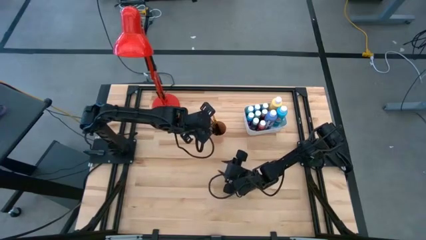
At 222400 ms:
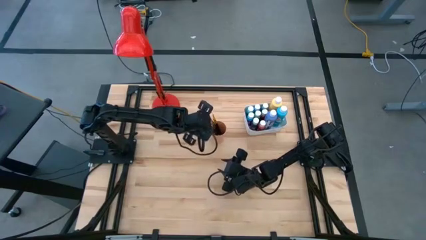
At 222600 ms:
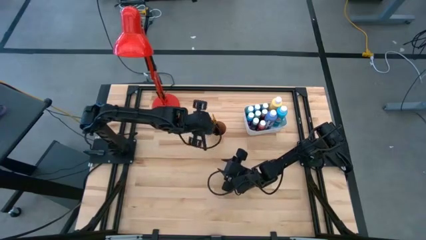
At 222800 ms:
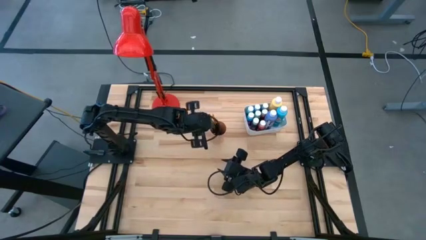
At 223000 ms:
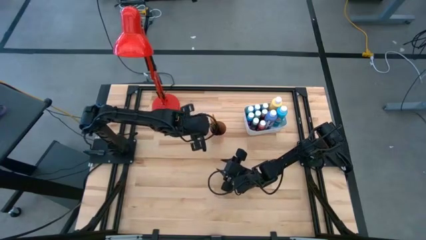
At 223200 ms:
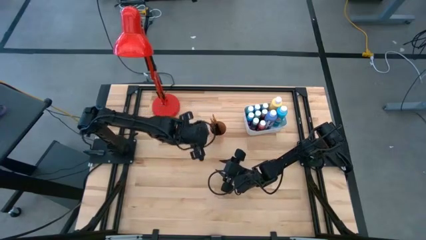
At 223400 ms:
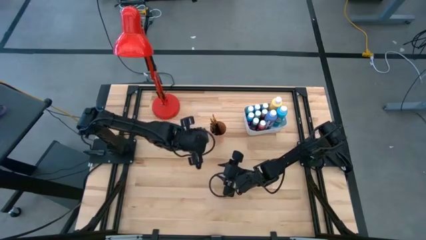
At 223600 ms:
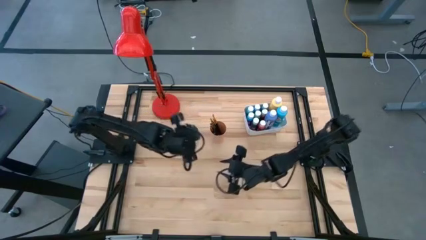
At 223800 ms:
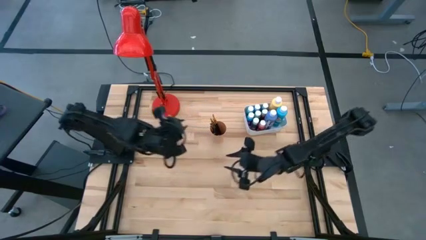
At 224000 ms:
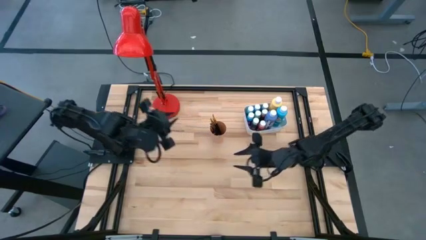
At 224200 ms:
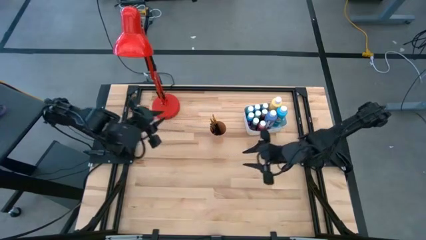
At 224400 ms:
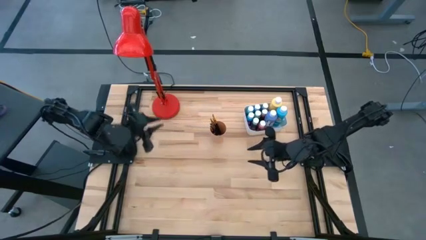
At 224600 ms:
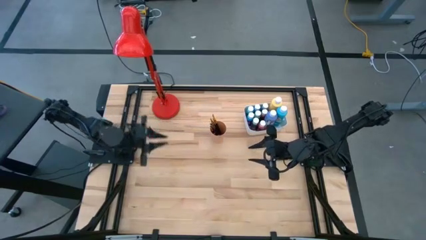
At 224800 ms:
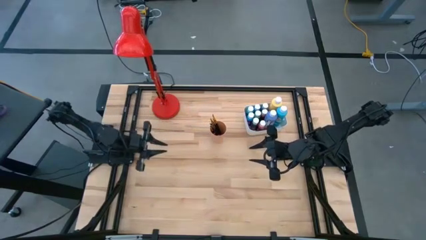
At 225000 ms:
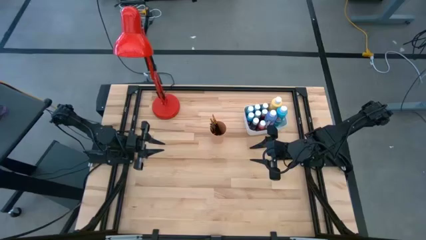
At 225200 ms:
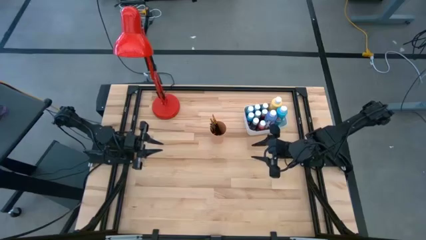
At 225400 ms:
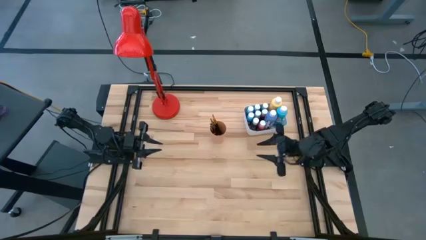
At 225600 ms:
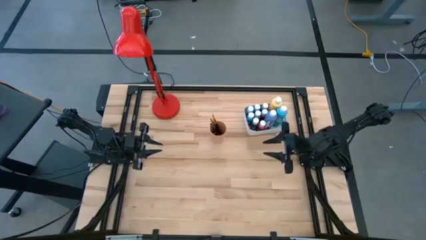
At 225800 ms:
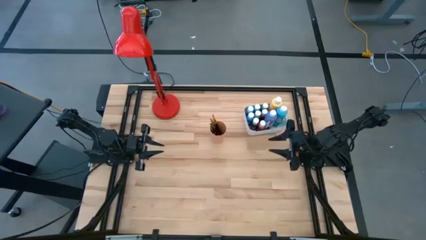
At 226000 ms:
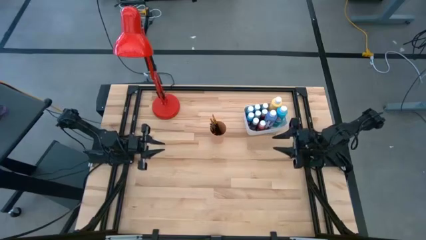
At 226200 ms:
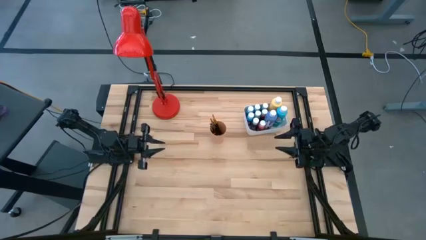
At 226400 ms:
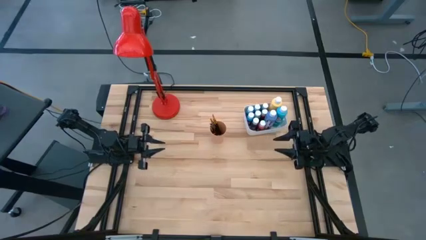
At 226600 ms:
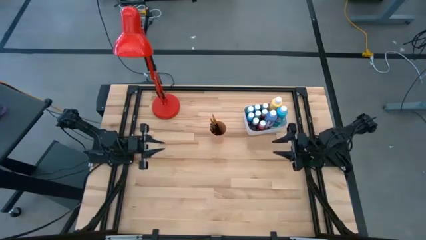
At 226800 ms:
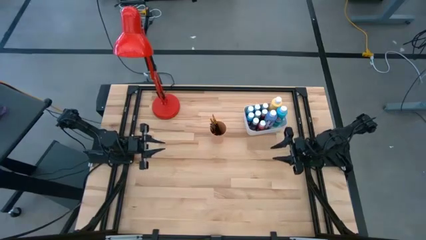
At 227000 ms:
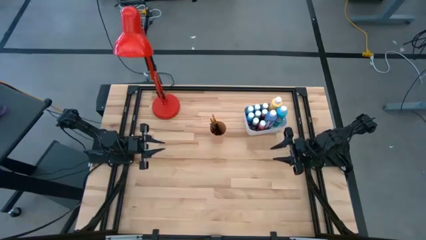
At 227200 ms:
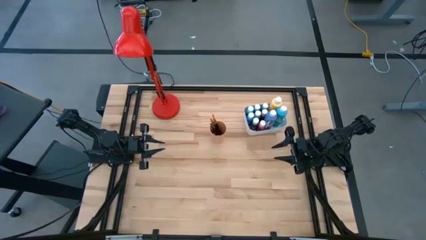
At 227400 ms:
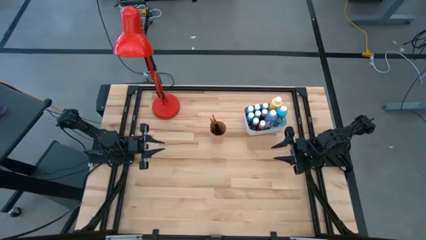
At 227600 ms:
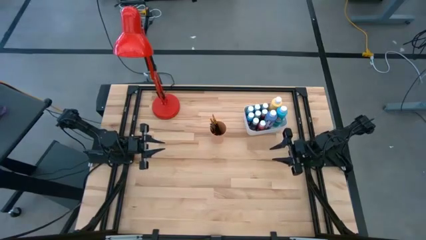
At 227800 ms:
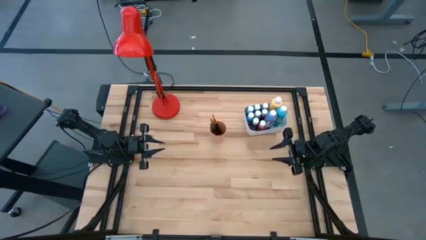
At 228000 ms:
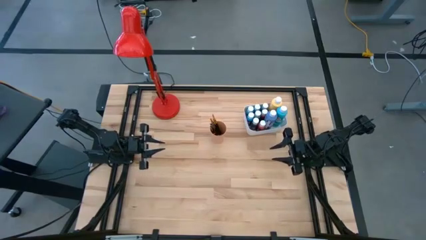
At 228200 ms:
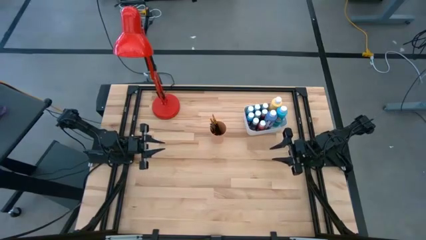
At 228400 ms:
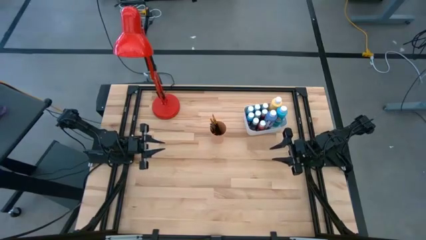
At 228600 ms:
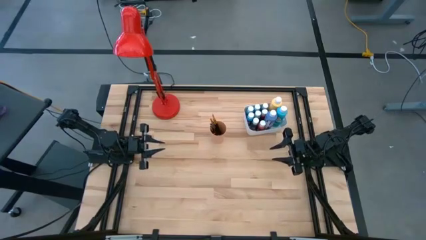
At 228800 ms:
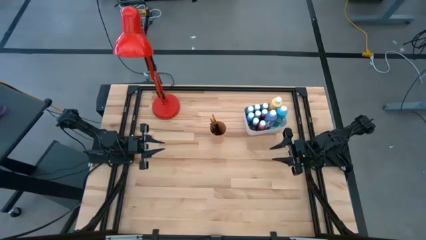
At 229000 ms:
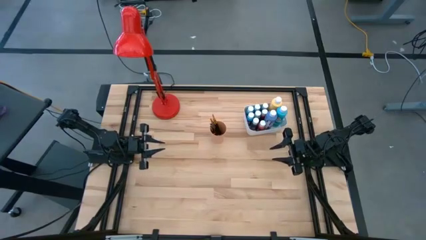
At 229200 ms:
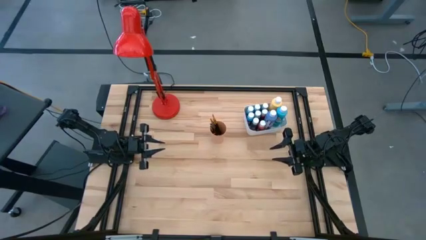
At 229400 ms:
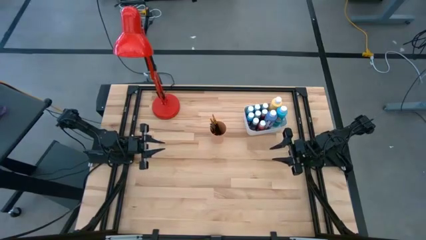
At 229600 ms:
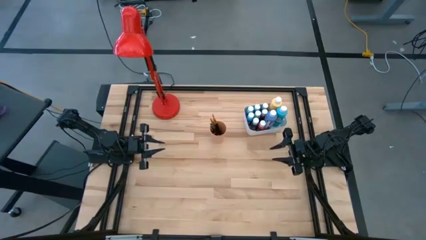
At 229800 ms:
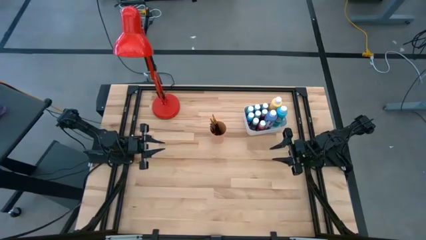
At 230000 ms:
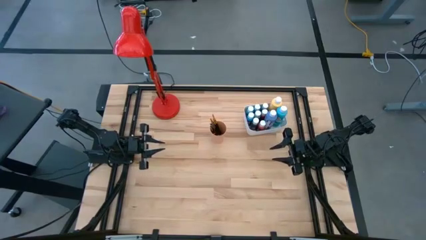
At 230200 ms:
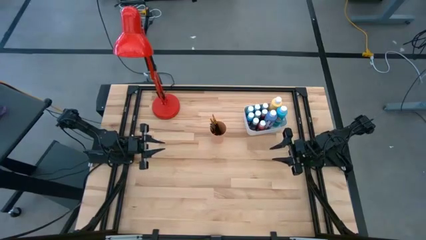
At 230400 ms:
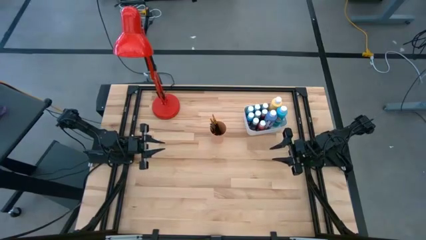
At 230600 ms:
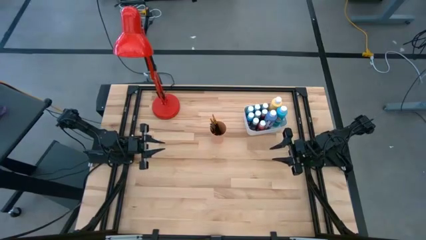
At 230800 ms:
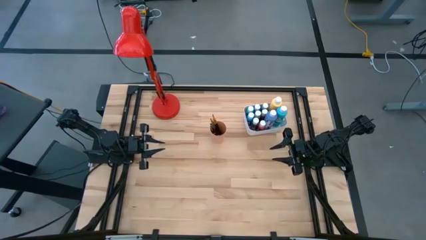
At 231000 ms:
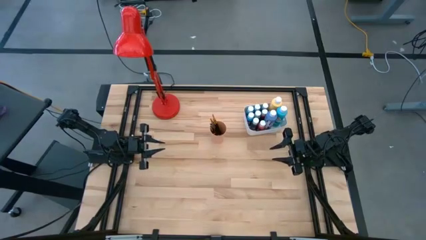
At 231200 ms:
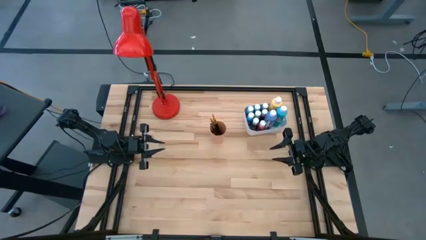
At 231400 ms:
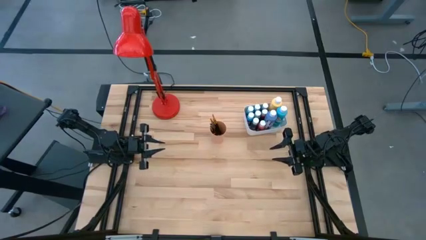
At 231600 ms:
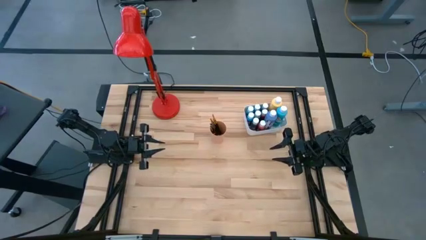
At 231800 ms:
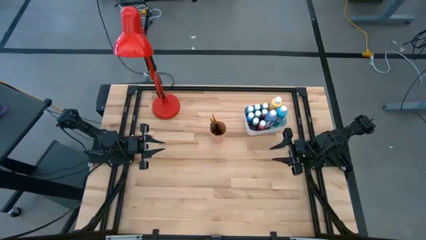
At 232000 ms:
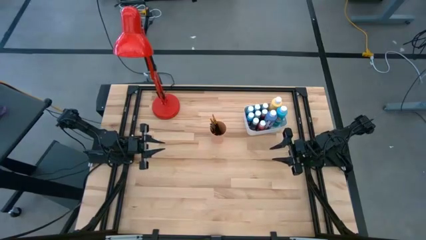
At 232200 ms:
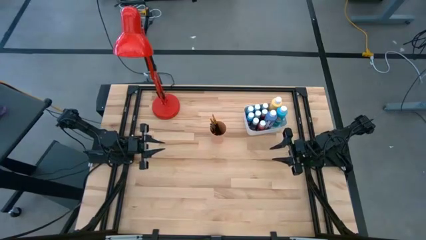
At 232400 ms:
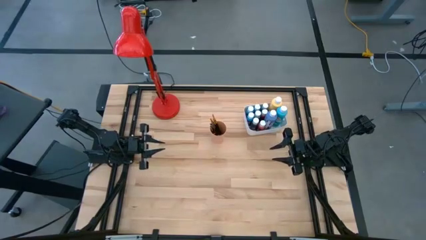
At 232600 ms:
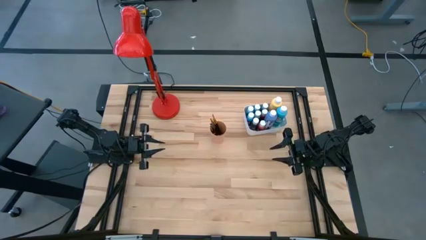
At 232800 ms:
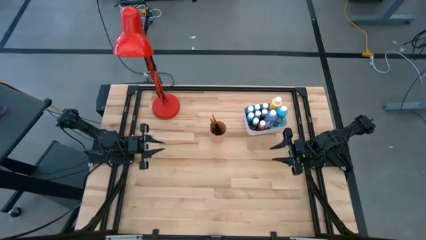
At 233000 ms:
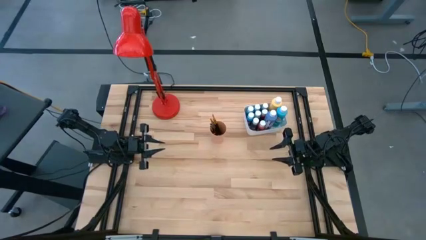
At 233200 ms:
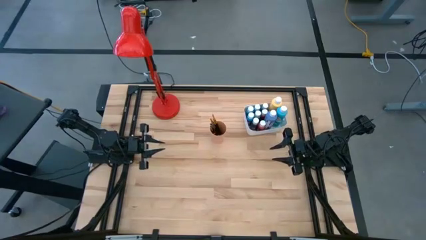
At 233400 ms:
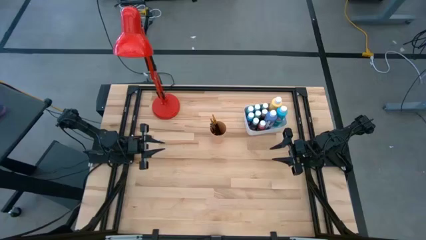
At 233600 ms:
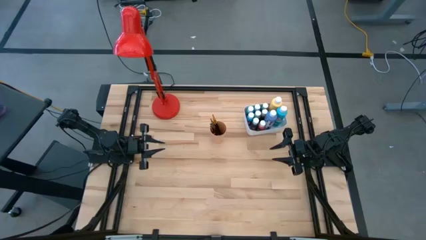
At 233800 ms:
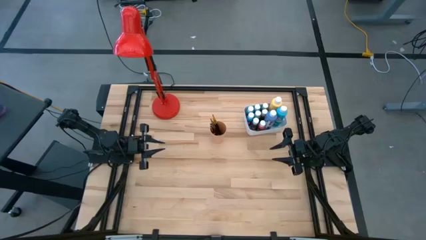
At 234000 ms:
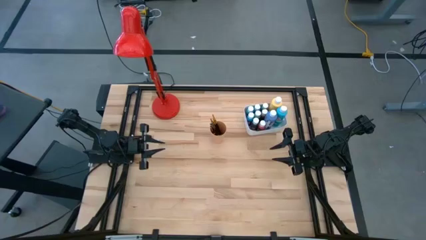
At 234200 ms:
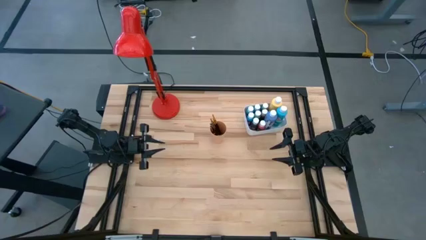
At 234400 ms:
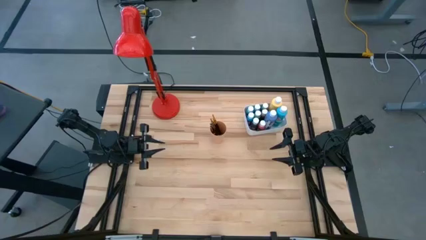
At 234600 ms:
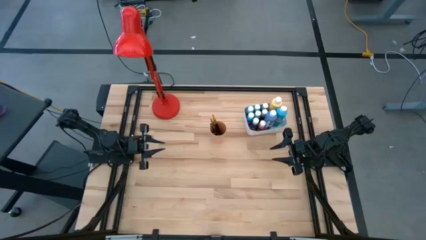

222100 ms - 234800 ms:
Task: Pick & Place Paint Supplies
Return to Home Position
